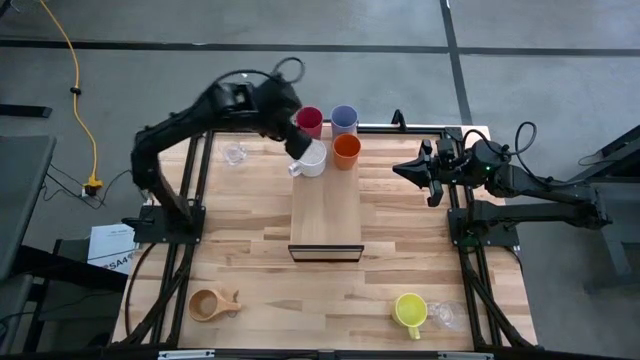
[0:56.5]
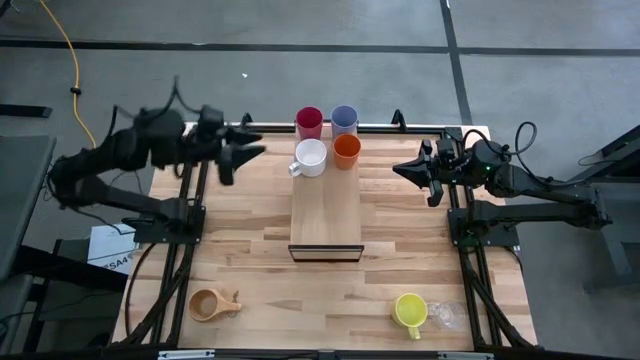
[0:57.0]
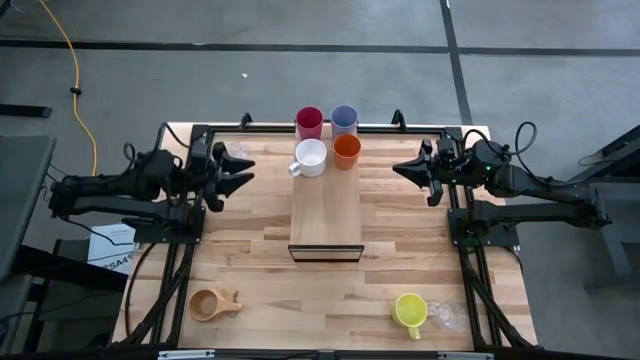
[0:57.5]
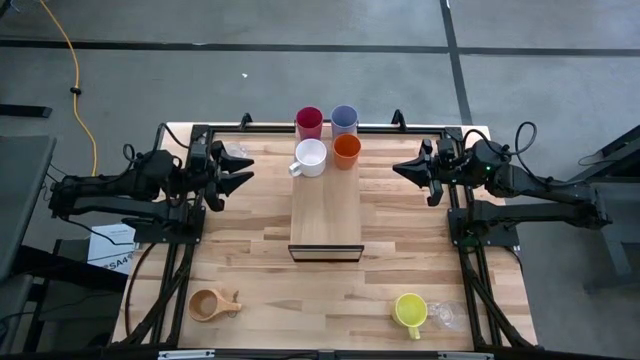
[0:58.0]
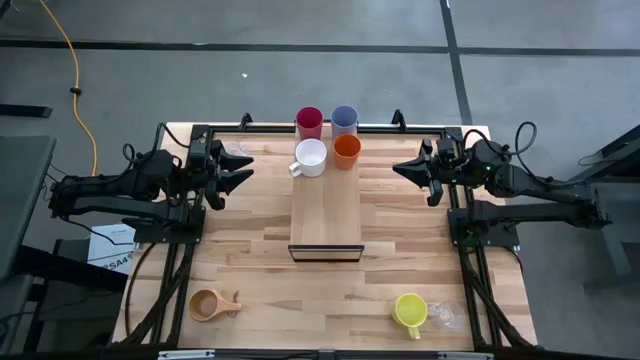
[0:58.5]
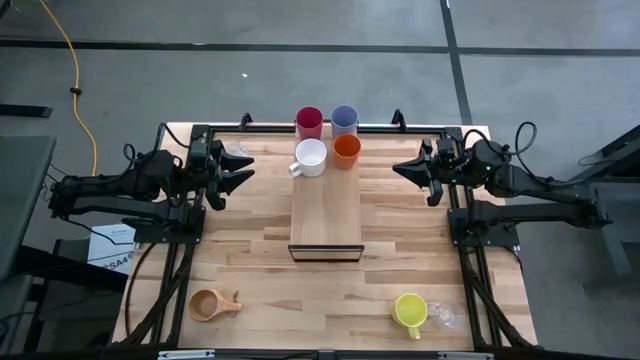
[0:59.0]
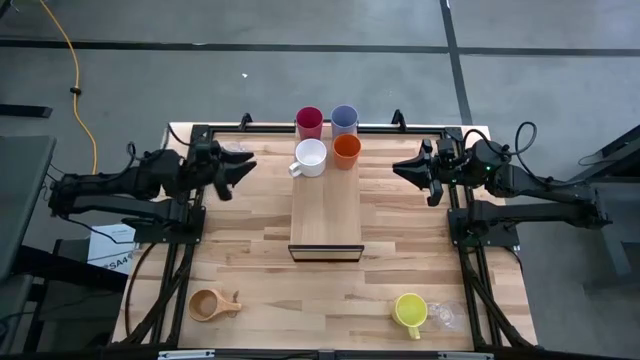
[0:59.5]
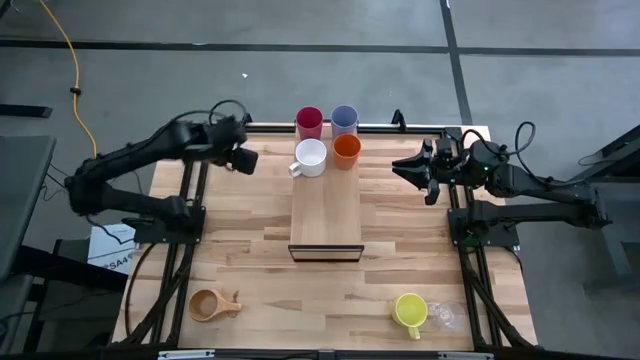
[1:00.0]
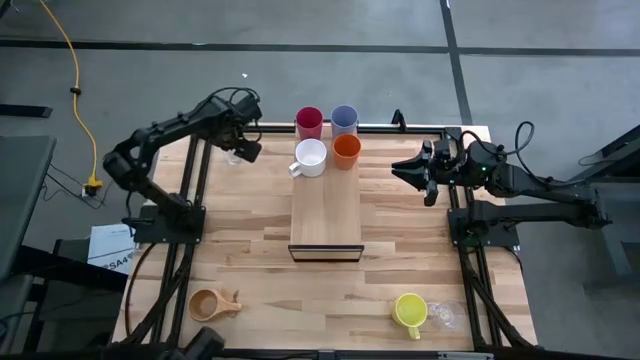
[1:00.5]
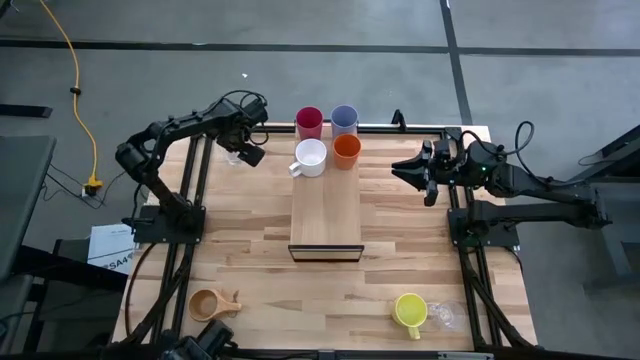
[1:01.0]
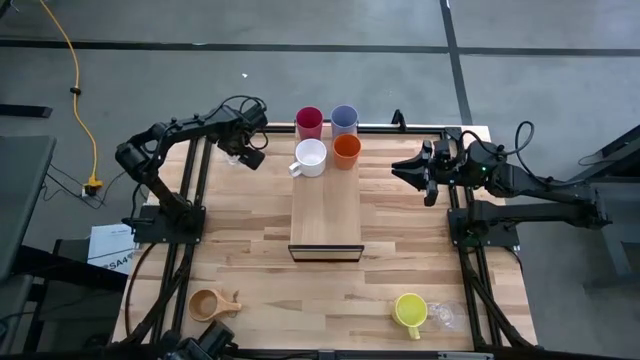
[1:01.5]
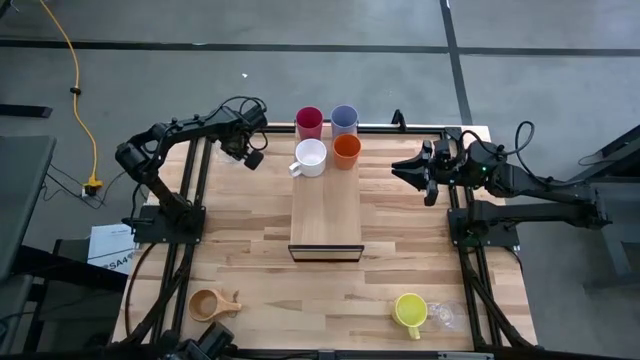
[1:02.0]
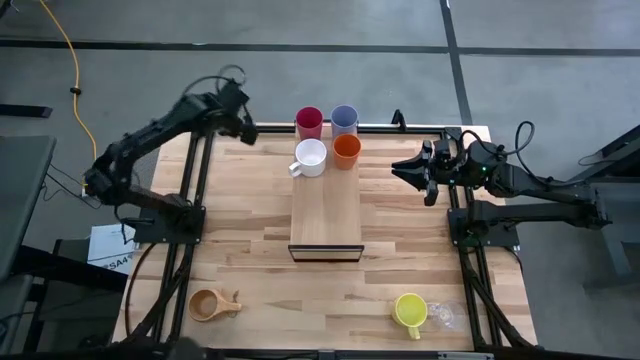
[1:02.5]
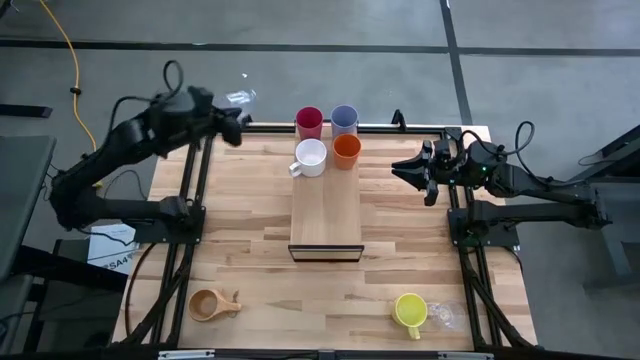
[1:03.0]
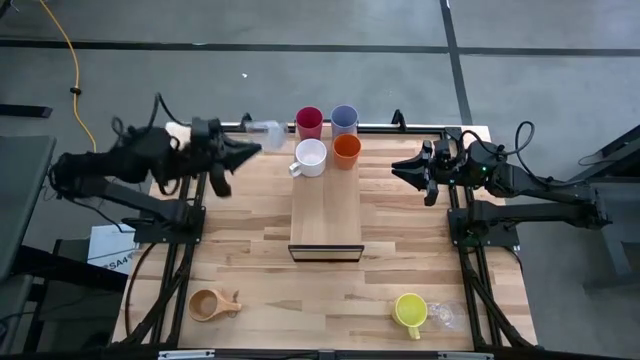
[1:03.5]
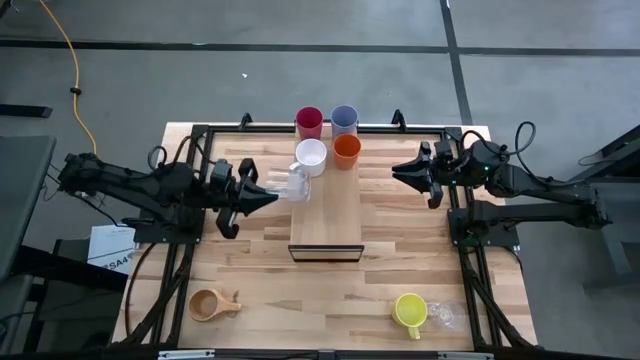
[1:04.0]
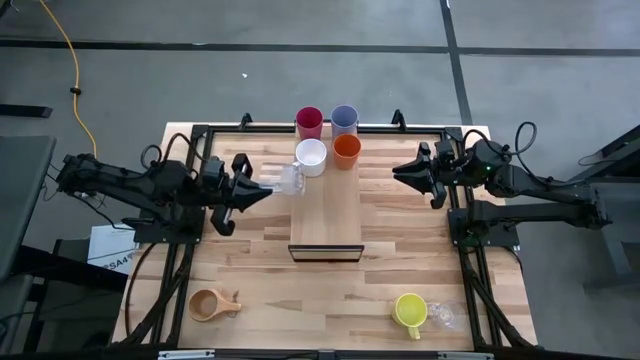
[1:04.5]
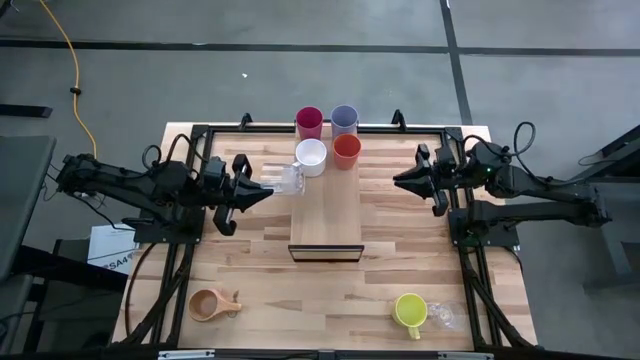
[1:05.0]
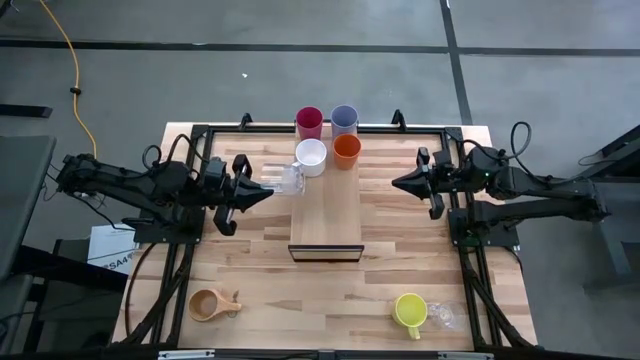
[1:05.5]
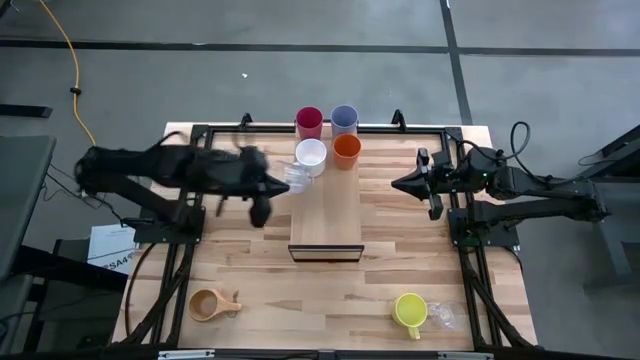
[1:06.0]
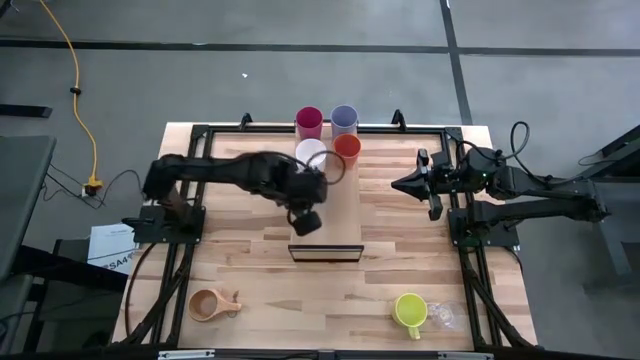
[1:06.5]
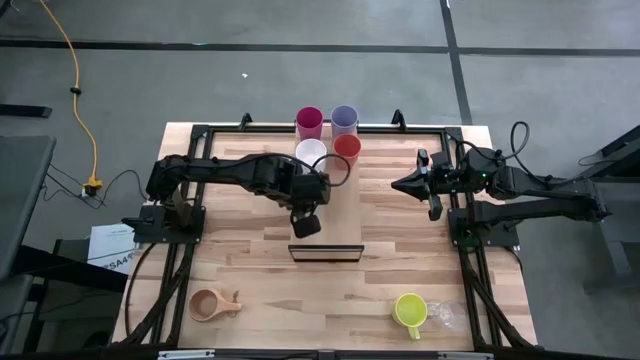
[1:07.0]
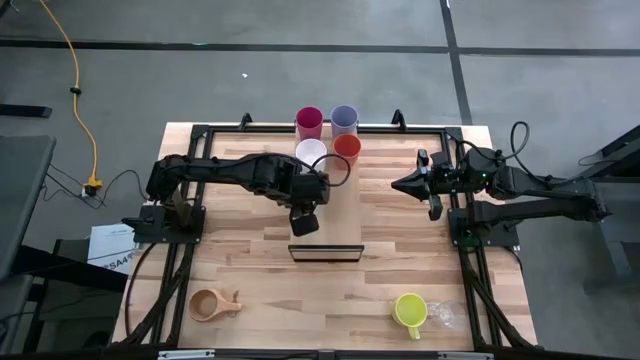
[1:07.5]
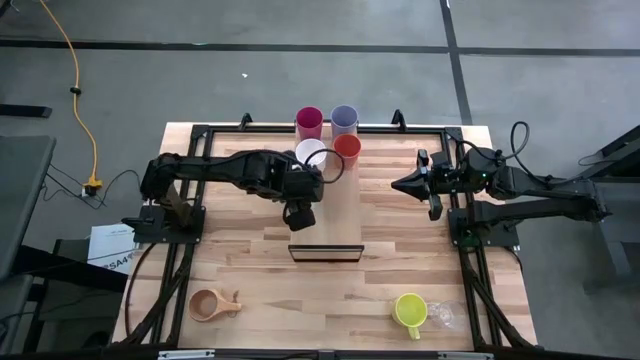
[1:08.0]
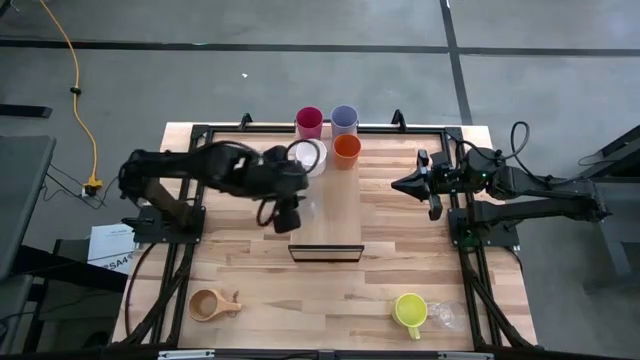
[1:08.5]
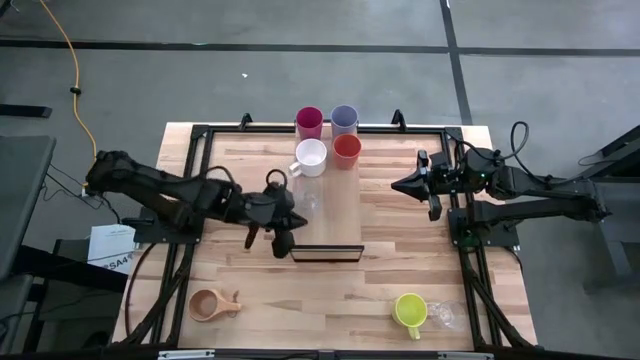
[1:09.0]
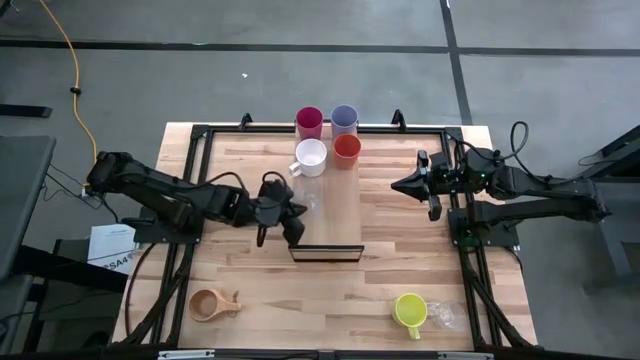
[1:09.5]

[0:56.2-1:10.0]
Task: Stack small to large cups/mugs on shelf
Put the top transparent mug on the shelf

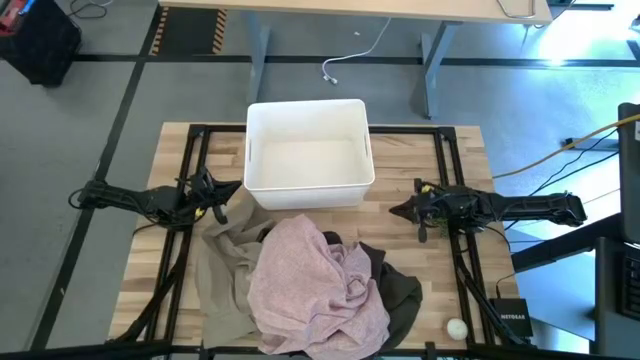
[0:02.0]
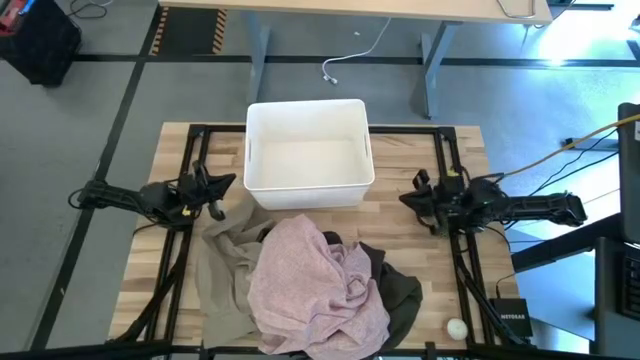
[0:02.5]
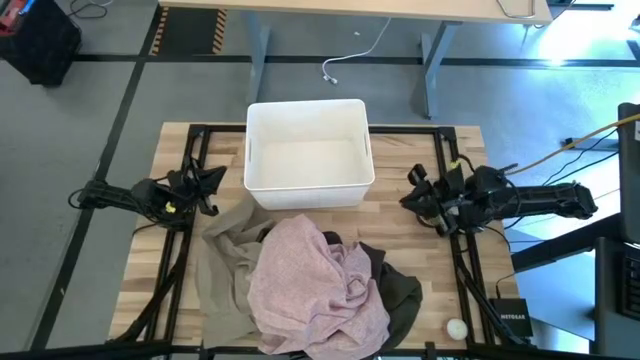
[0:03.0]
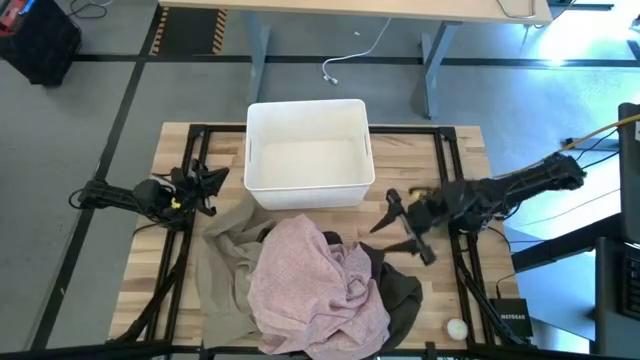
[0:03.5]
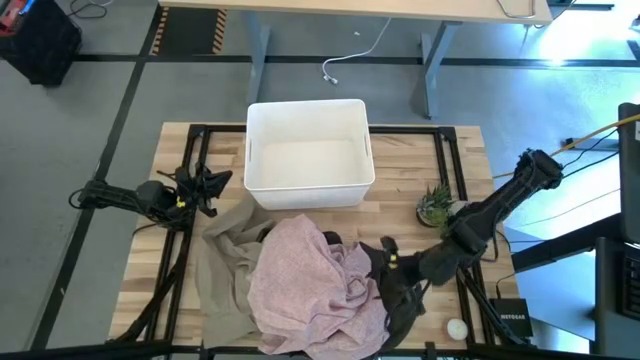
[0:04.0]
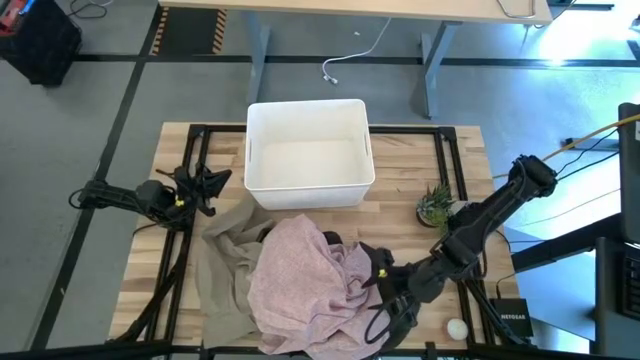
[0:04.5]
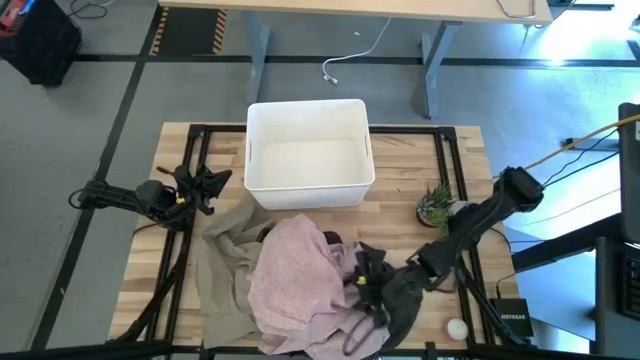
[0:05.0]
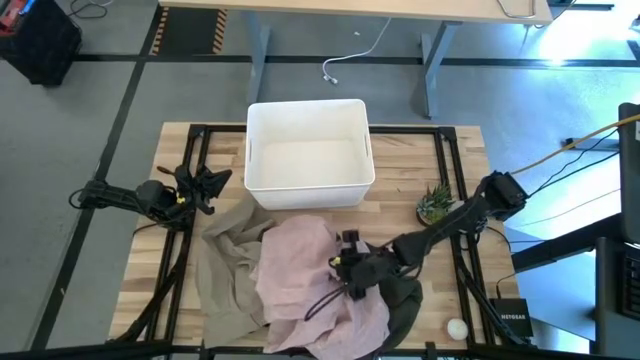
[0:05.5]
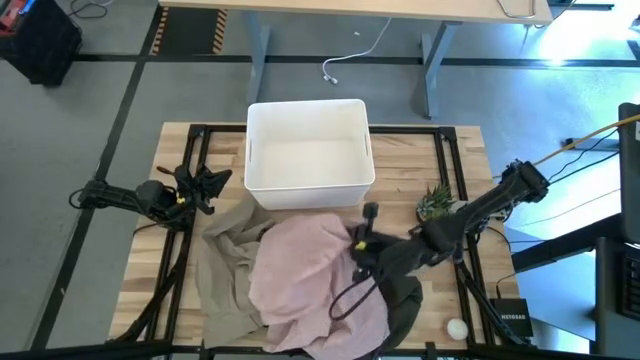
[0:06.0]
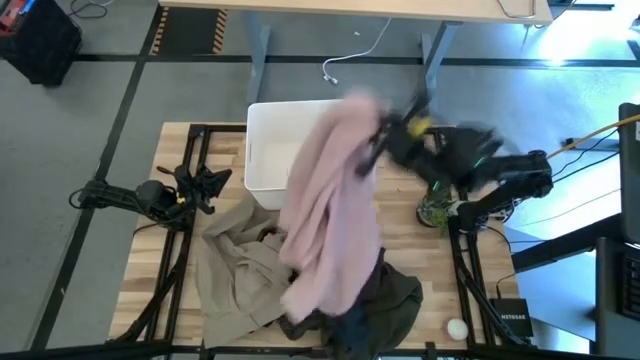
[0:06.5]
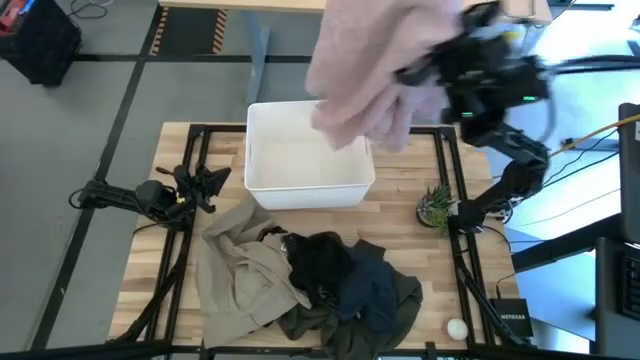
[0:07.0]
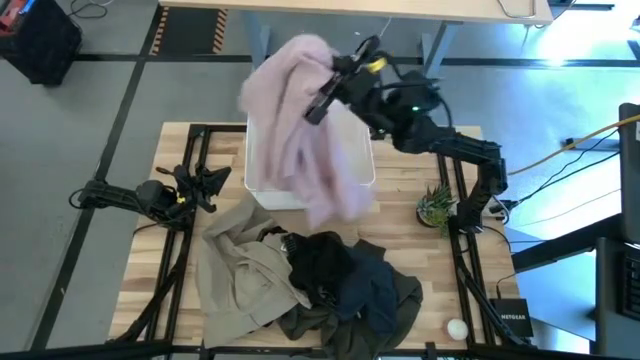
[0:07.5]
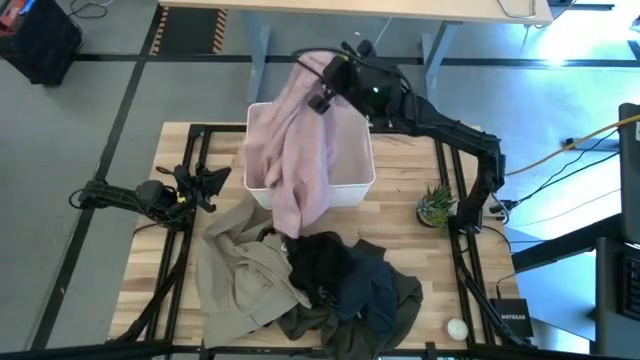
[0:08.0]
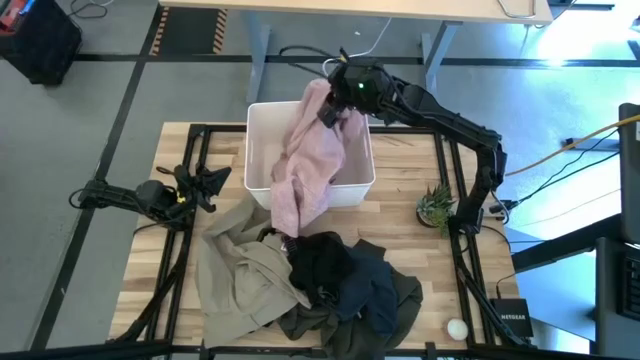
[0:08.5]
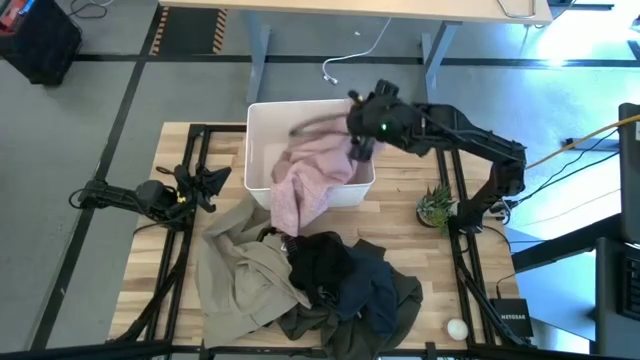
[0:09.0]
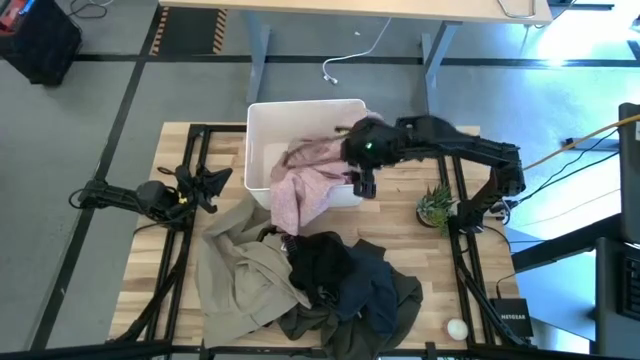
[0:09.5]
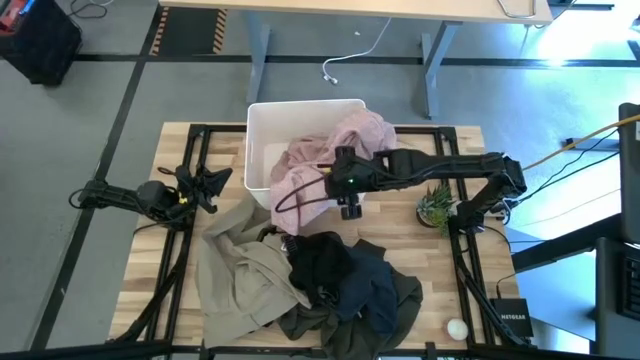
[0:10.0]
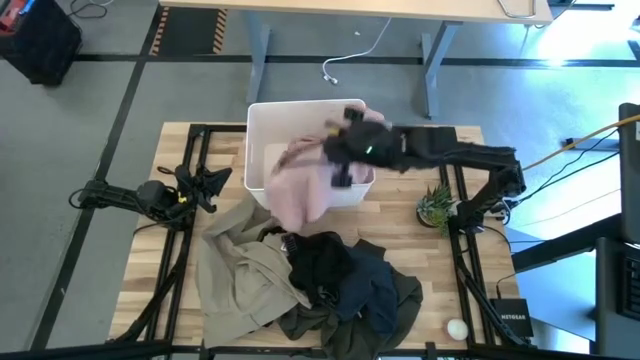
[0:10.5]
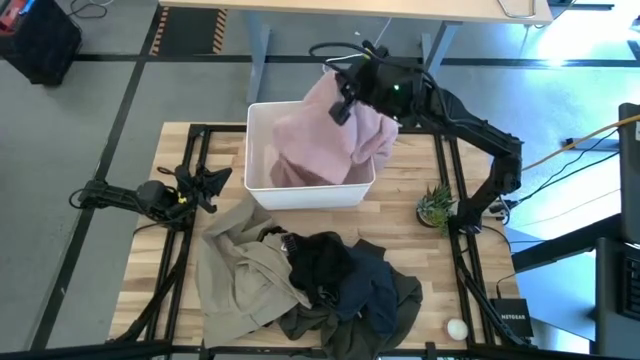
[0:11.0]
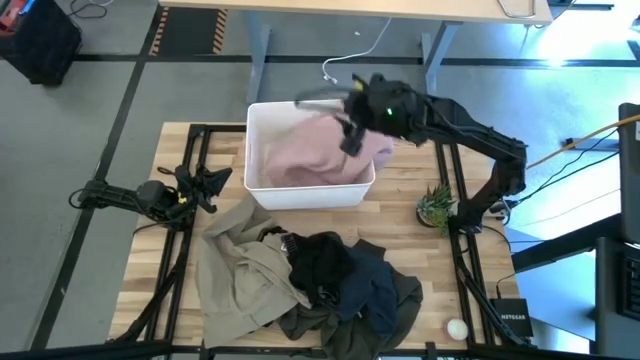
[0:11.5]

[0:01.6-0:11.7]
Task: Sort clothes
Put the pink dress into the white bin
